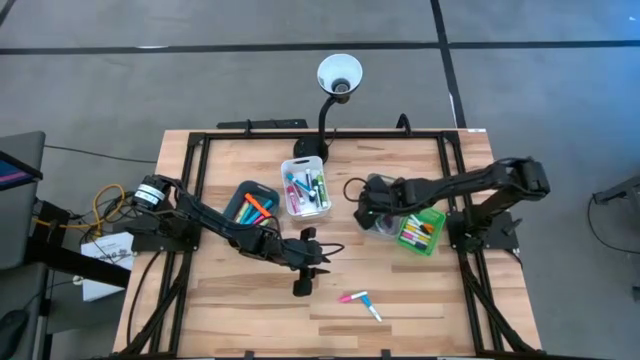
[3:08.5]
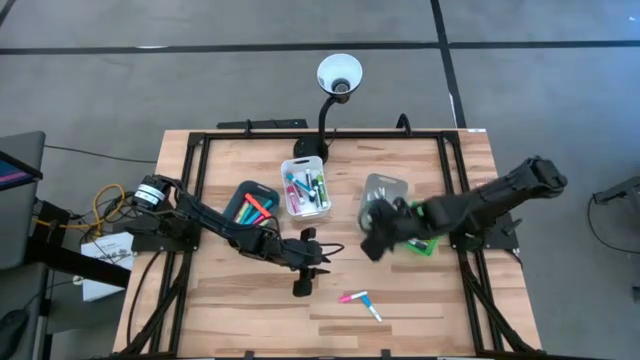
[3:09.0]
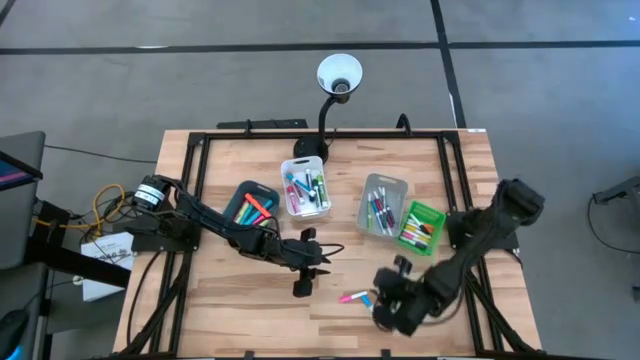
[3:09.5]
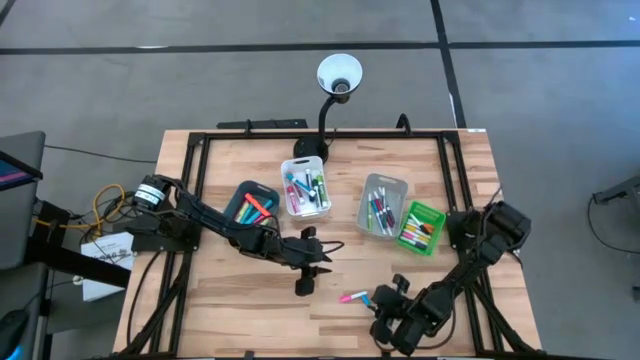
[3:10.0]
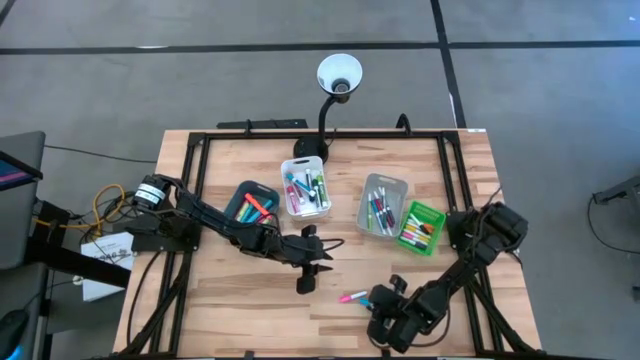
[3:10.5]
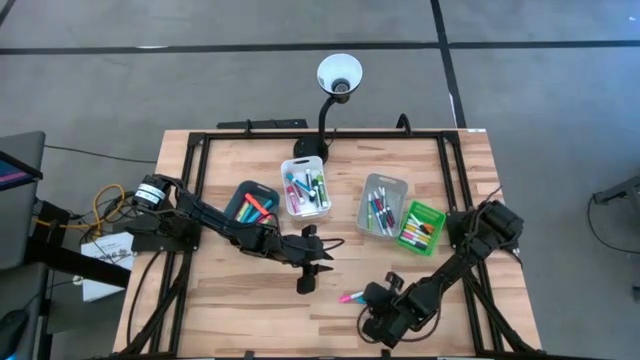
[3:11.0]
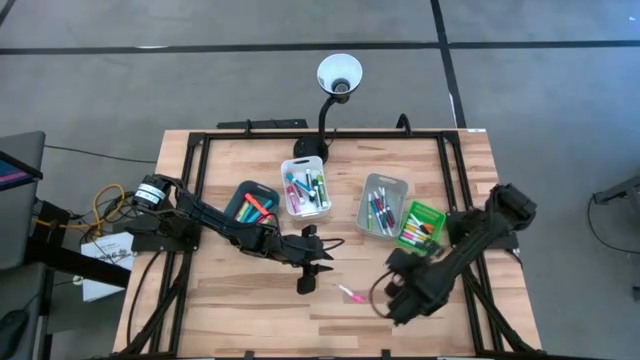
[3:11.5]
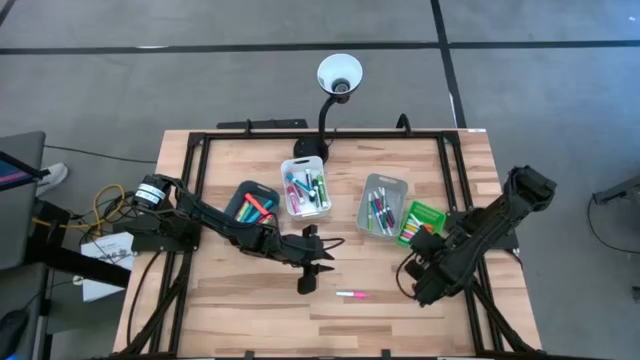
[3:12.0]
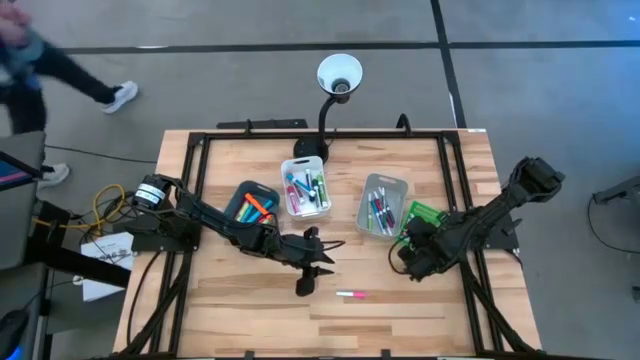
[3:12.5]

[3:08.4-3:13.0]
Task: Pick & Place Markers
Put the light blue mini marker into the green bin

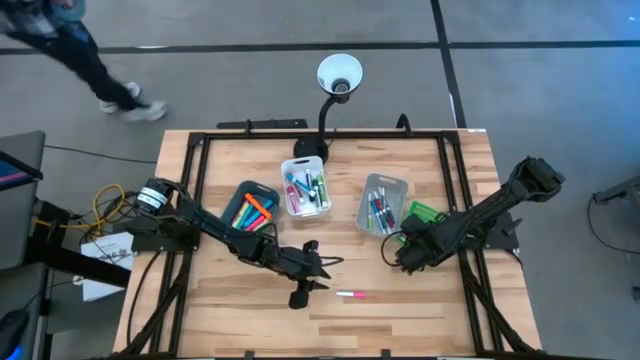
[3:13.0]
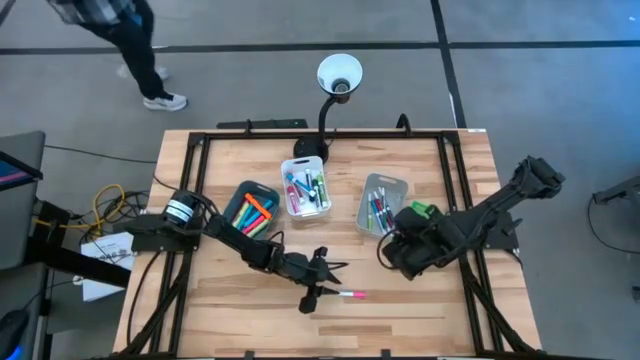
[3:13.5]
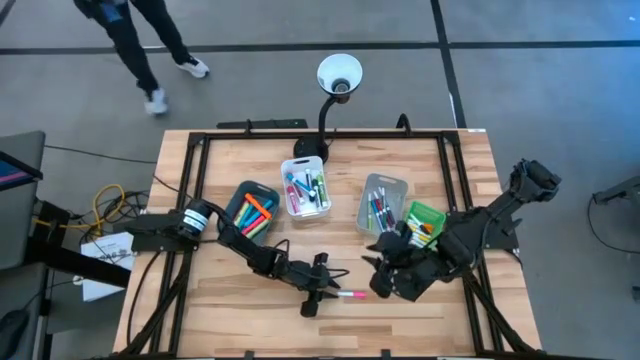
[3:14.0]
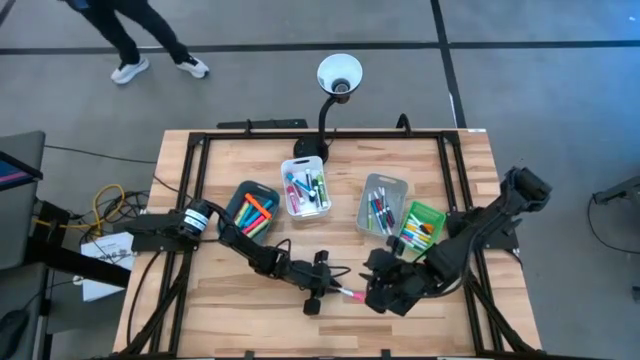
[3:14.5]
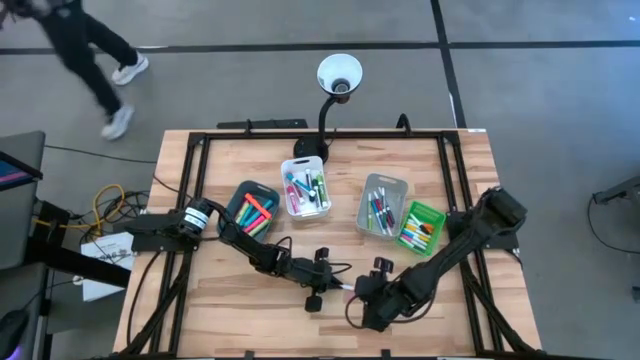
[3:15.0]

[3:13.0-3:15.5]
Put the pink mini marker into the green bin

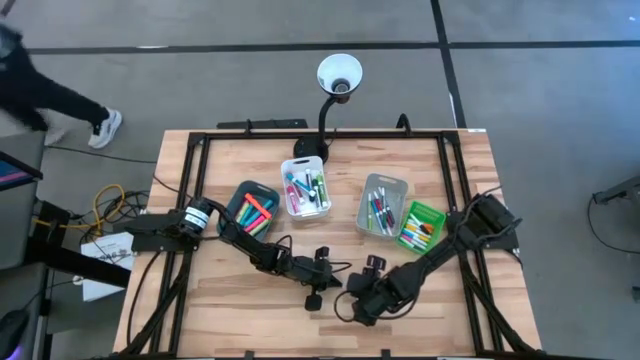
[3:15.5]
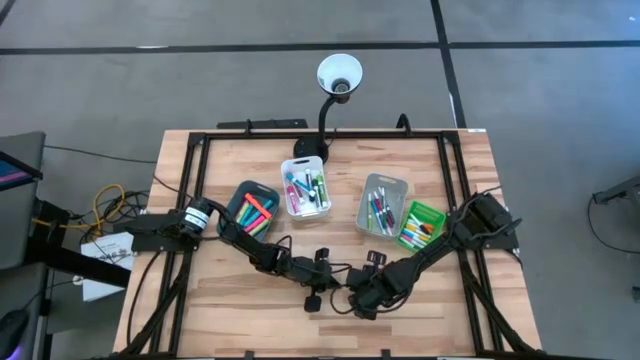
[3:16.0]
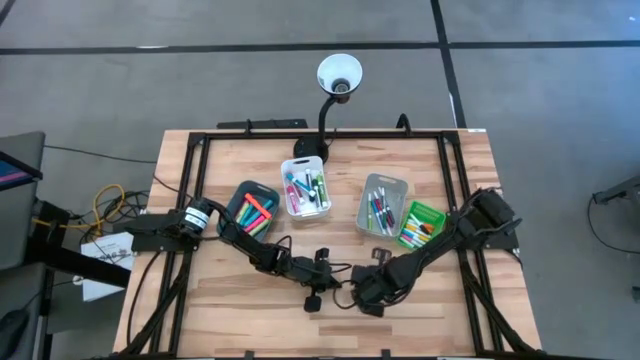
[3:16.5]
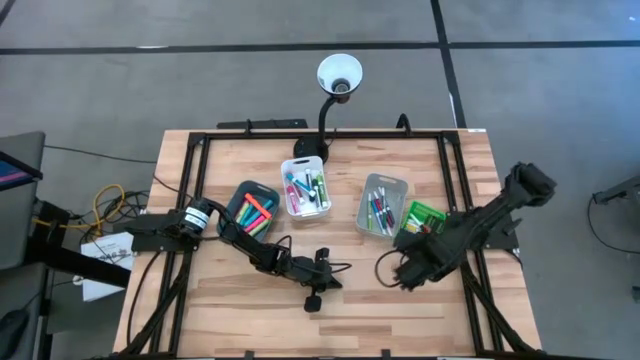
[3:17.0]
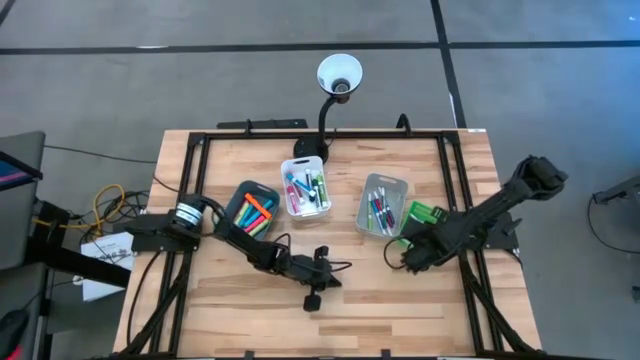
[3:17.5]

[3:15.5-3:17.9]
Put the pink mini marker into the green bin

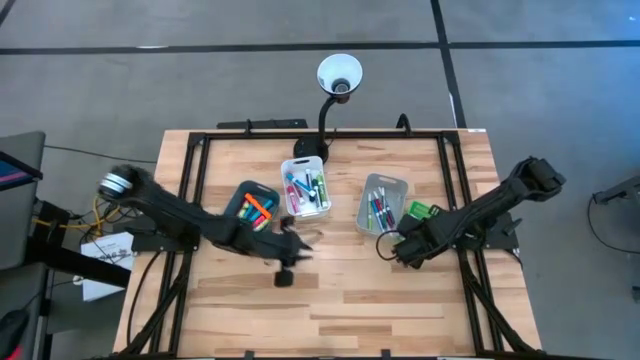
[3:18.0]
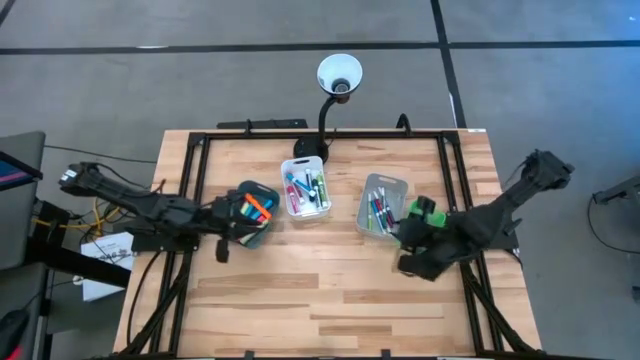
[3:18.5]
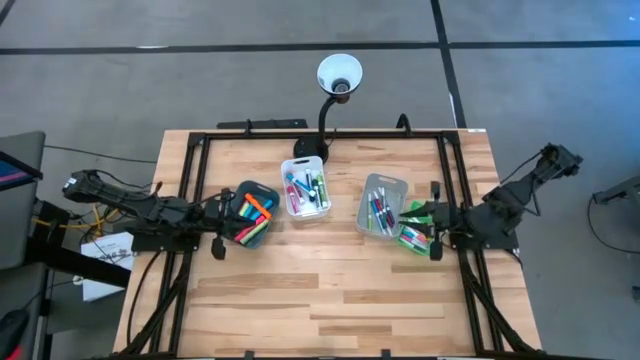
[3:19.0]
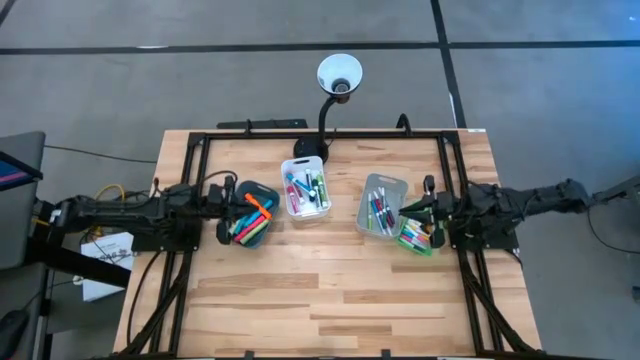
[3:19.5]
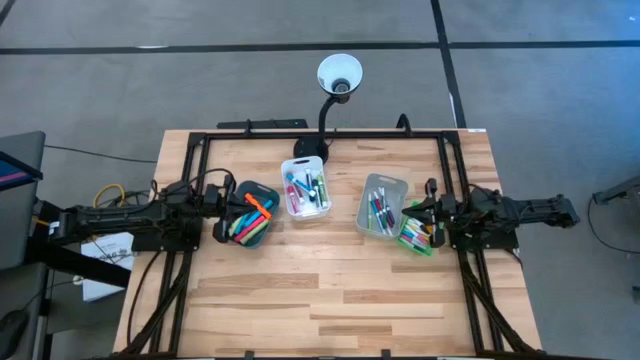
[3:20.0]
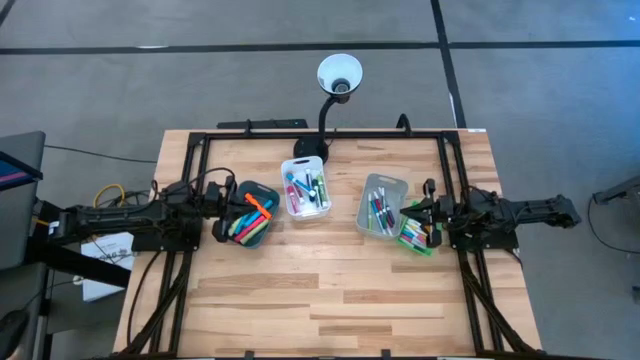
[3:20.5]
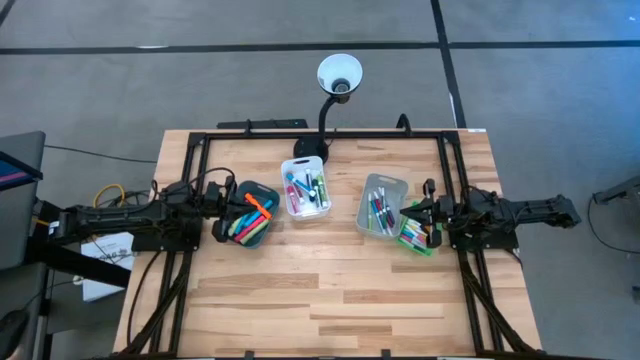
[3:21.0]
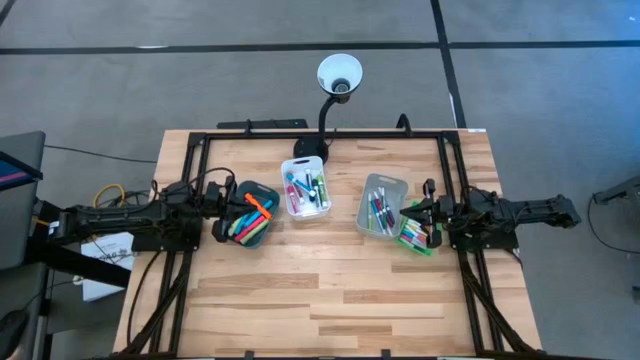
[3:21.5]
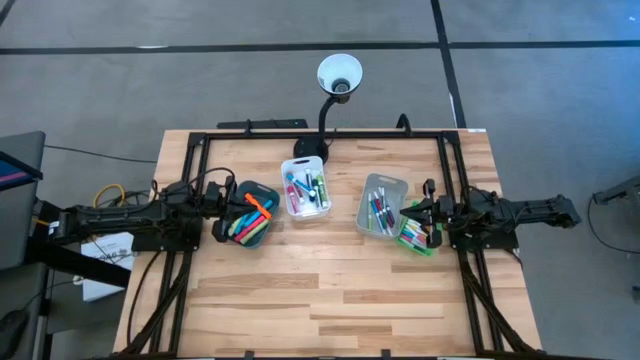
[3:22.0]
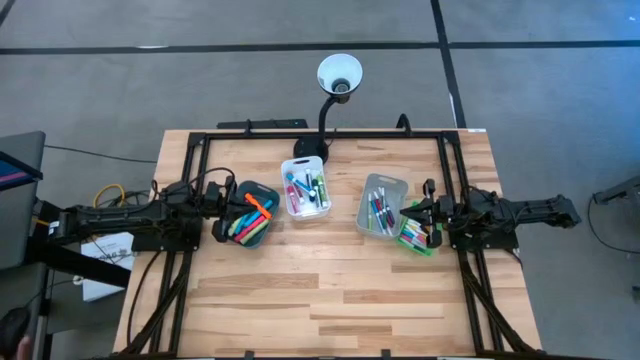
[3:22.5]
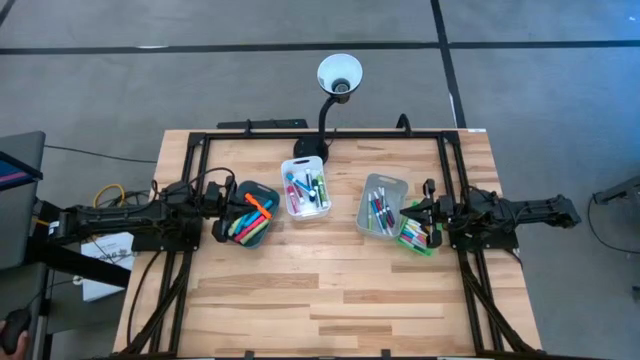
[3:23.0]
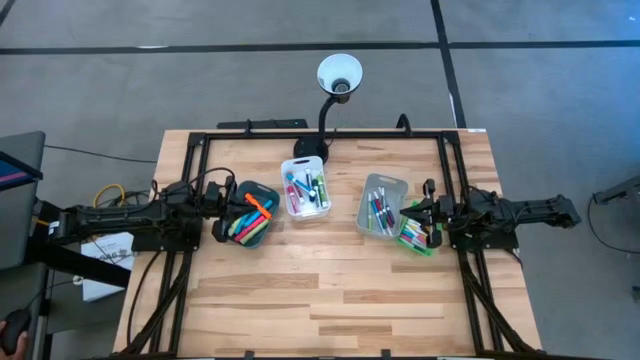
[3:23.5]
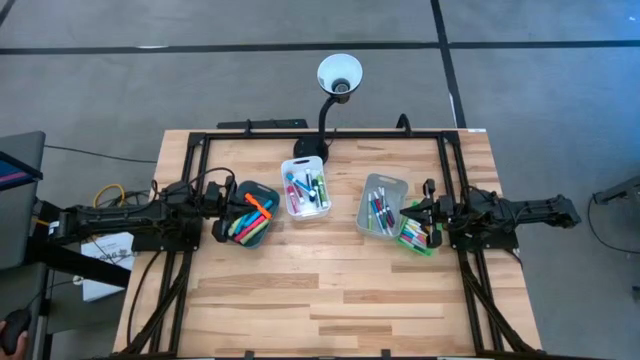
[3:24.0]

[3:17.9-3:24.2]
Return to Home Position

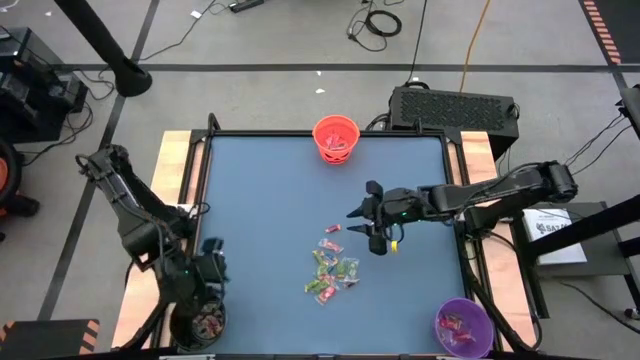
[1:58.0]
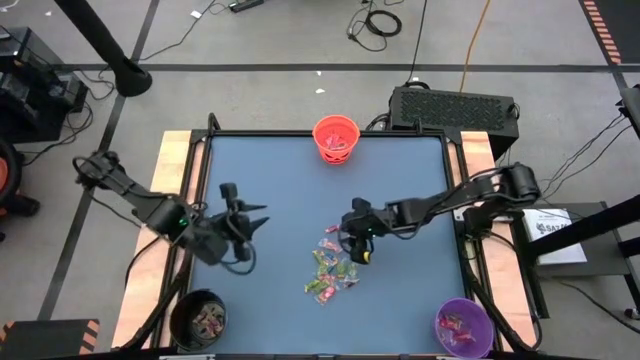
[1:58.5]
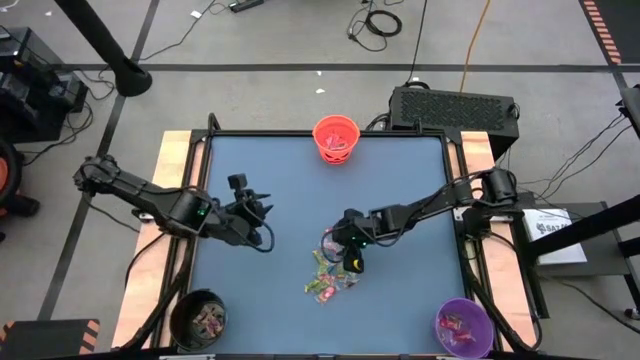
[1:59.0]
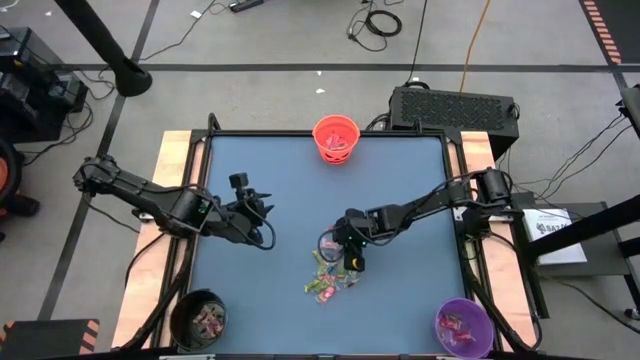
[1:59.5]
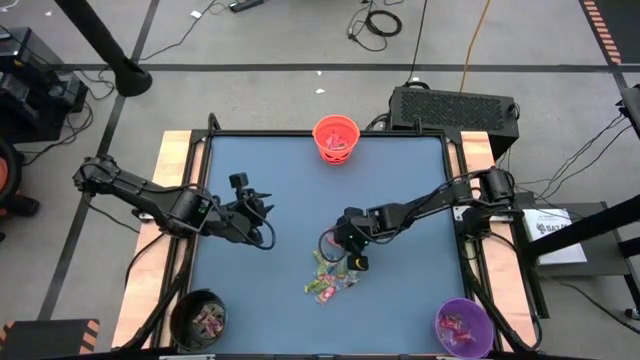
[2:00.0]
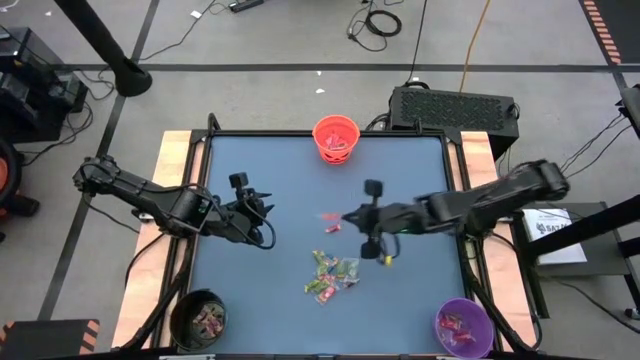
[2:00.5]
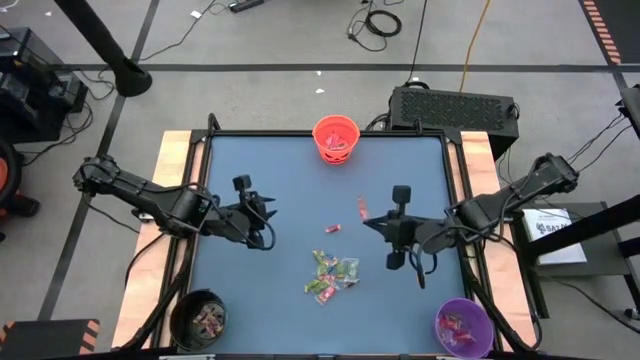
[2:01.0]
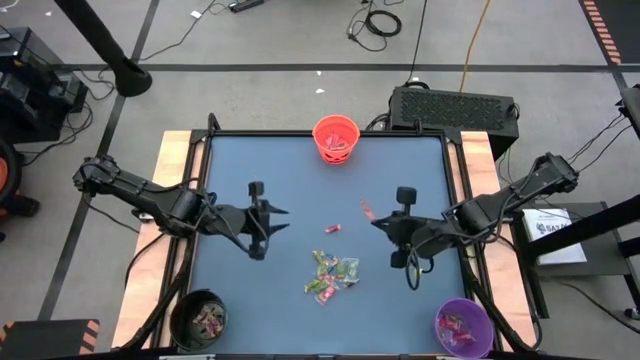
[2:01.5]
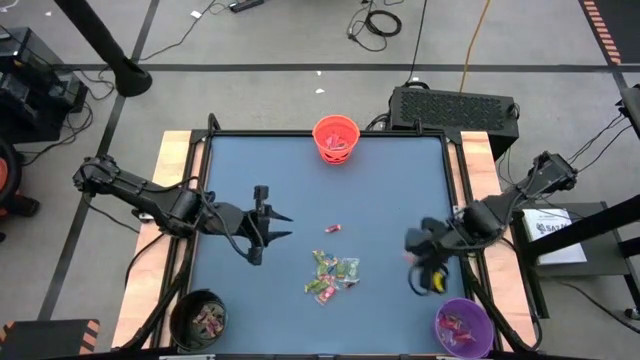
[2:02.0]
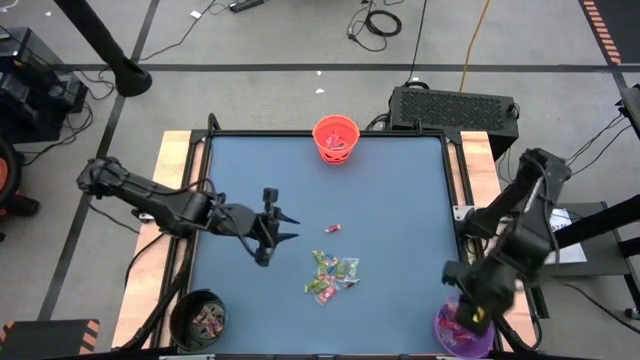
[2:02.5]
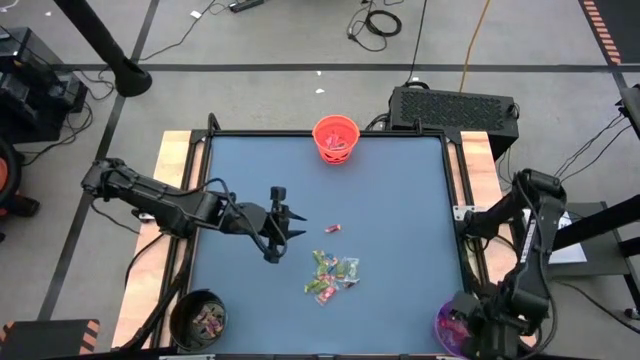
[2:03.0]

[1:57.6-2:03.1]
Task: Sort candy by brand, put in halloween buckets
Put the small orange gummy into the purple bucket
